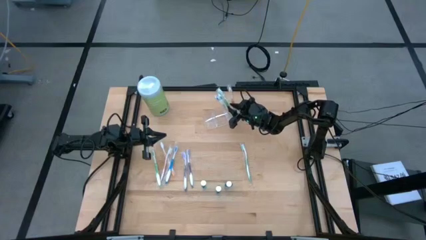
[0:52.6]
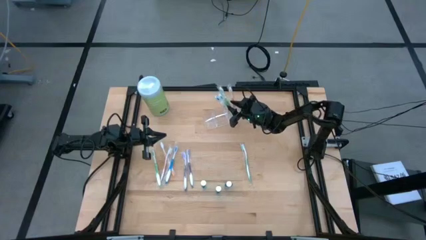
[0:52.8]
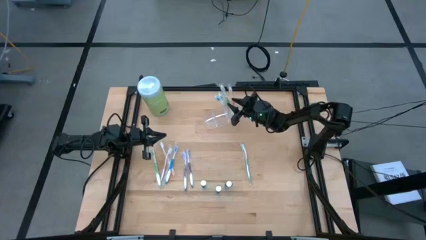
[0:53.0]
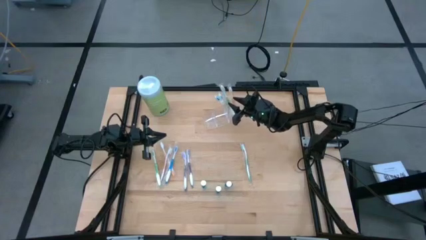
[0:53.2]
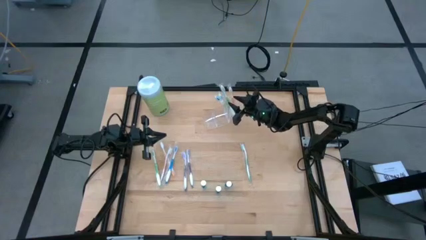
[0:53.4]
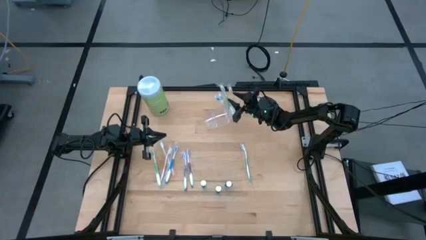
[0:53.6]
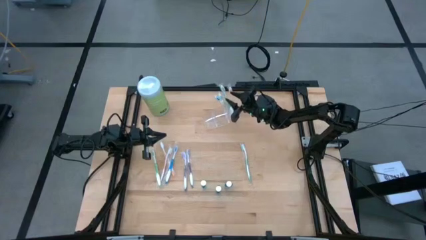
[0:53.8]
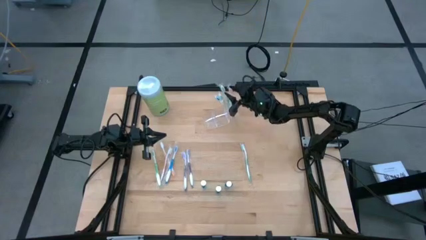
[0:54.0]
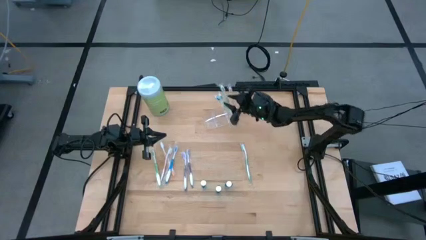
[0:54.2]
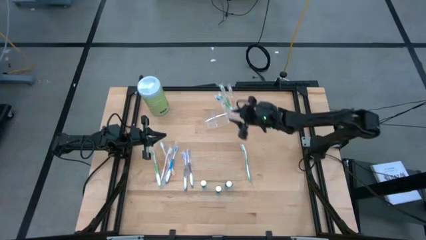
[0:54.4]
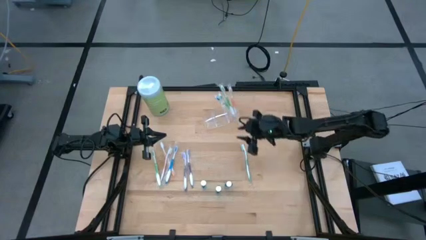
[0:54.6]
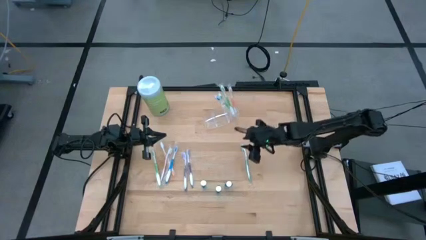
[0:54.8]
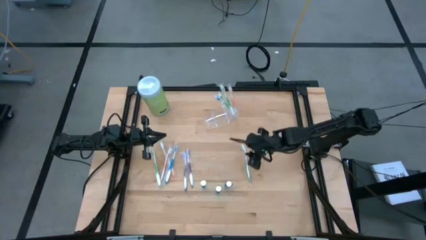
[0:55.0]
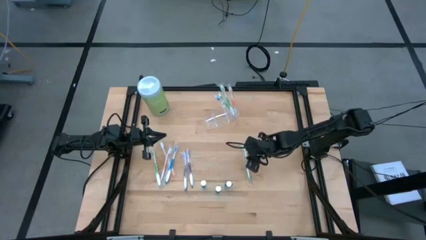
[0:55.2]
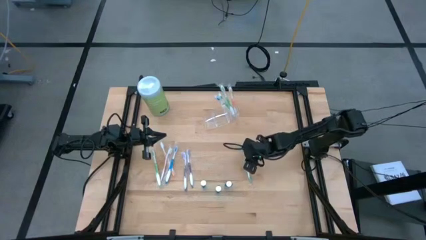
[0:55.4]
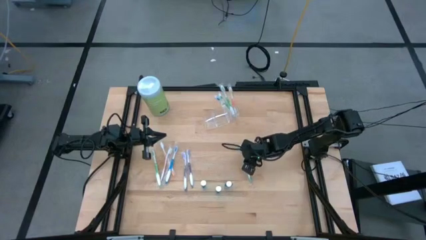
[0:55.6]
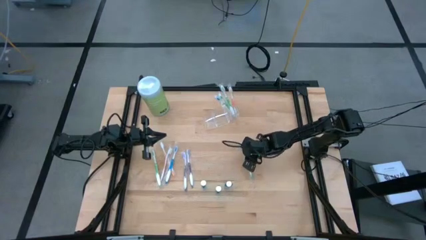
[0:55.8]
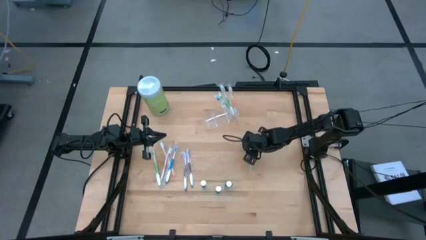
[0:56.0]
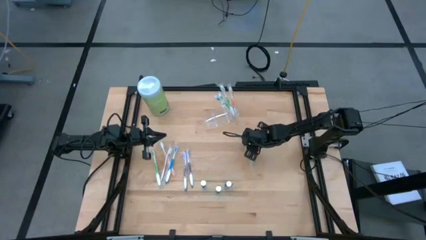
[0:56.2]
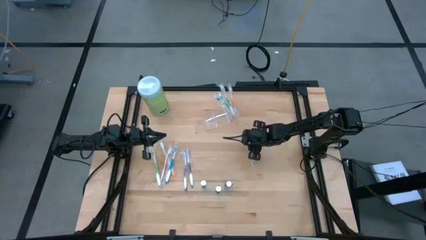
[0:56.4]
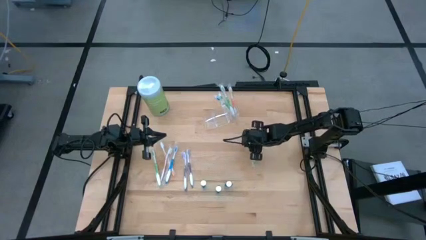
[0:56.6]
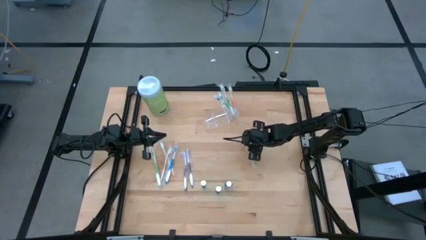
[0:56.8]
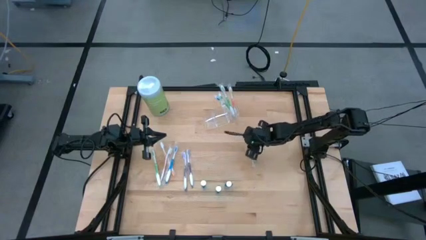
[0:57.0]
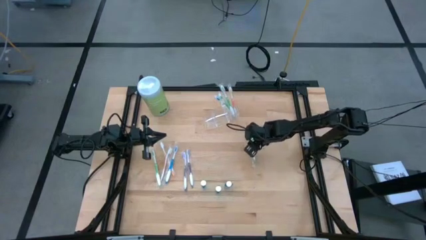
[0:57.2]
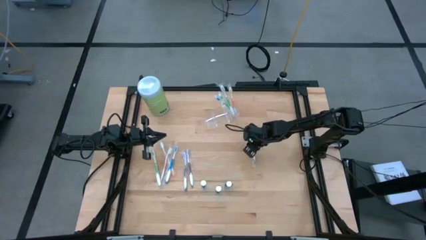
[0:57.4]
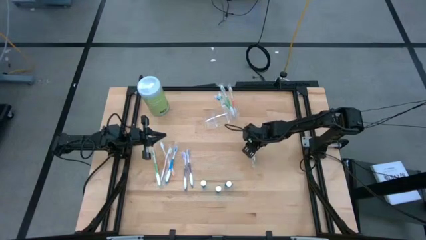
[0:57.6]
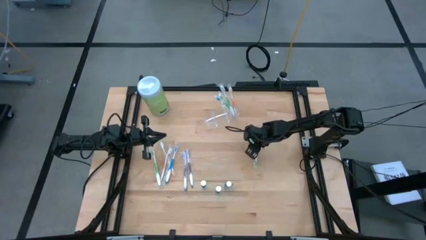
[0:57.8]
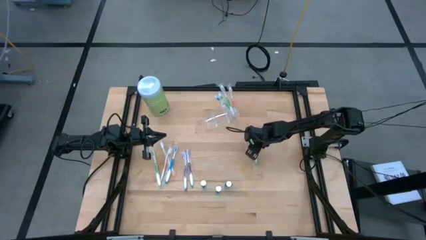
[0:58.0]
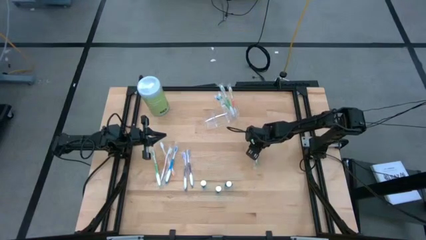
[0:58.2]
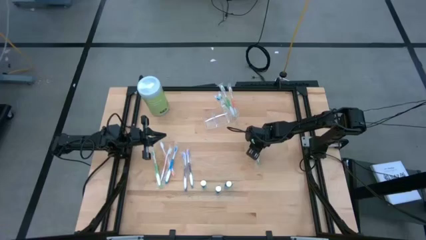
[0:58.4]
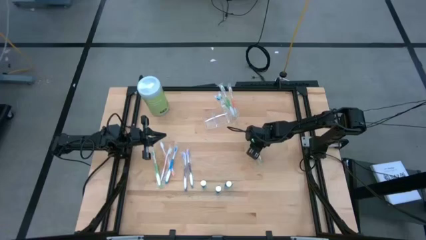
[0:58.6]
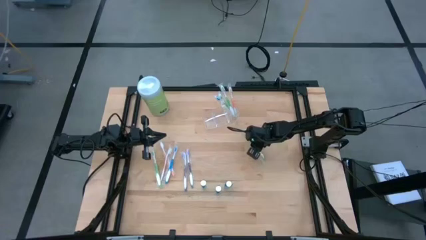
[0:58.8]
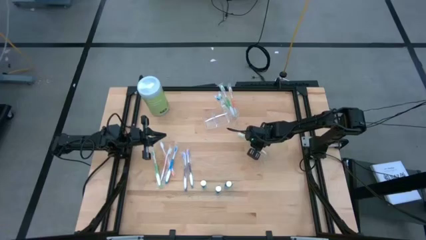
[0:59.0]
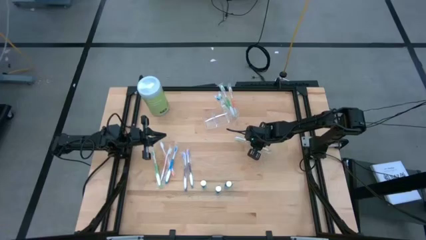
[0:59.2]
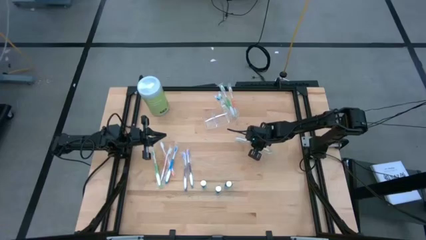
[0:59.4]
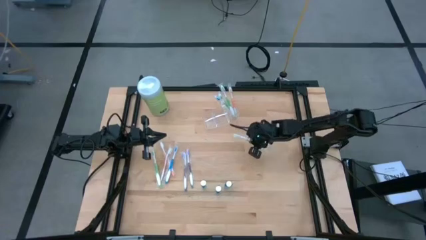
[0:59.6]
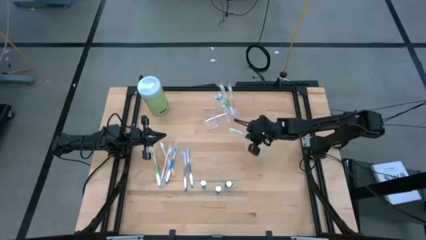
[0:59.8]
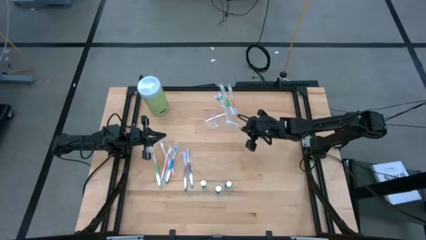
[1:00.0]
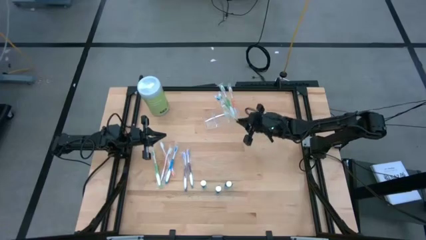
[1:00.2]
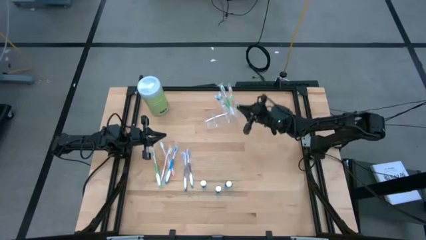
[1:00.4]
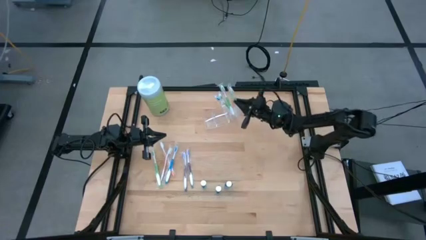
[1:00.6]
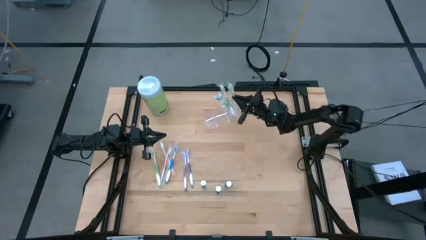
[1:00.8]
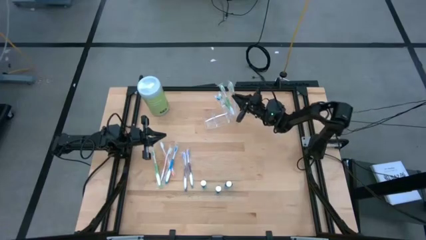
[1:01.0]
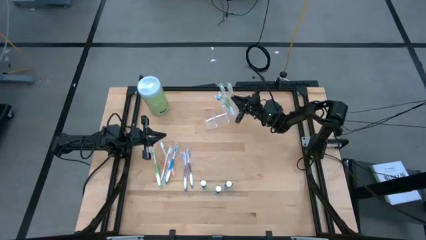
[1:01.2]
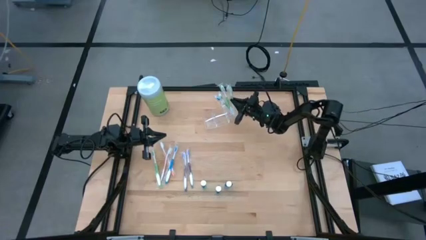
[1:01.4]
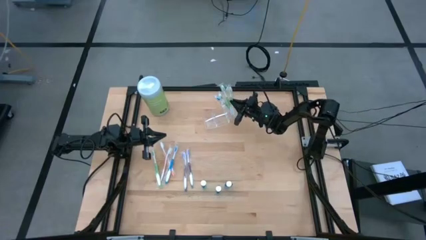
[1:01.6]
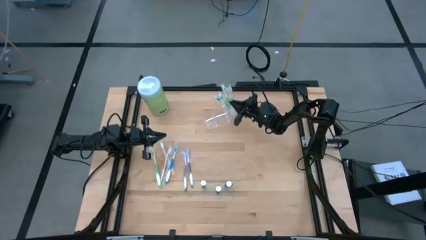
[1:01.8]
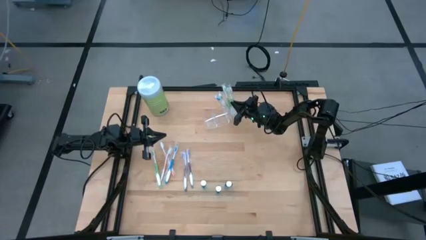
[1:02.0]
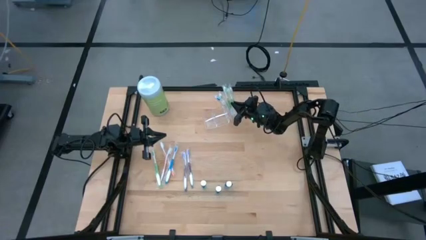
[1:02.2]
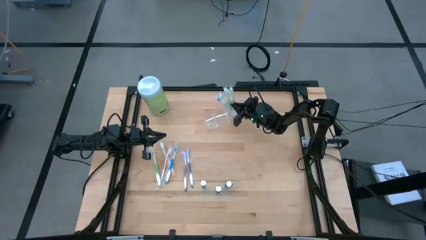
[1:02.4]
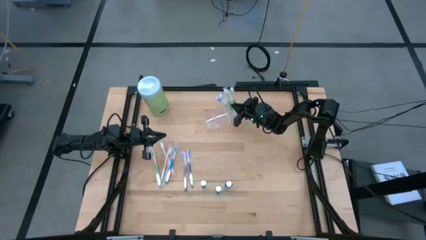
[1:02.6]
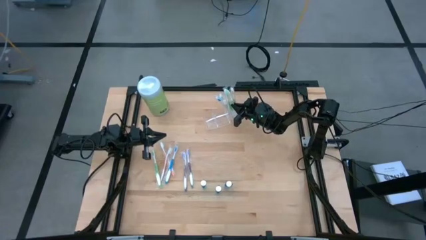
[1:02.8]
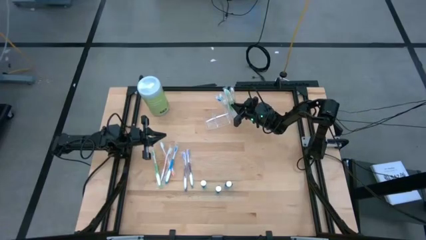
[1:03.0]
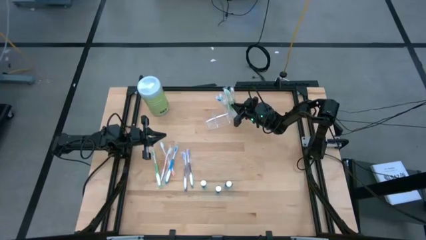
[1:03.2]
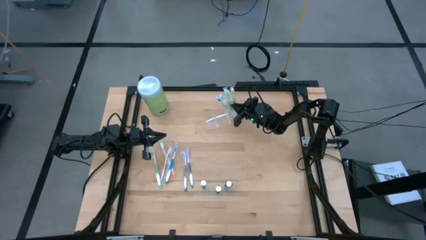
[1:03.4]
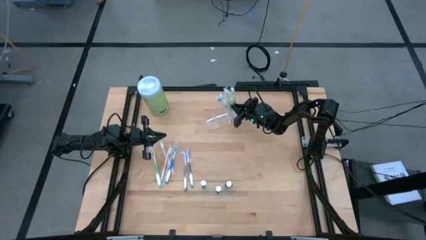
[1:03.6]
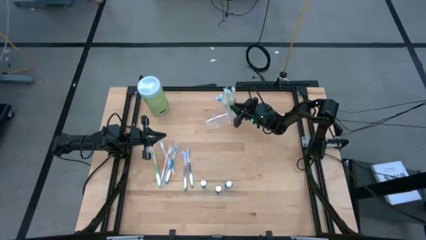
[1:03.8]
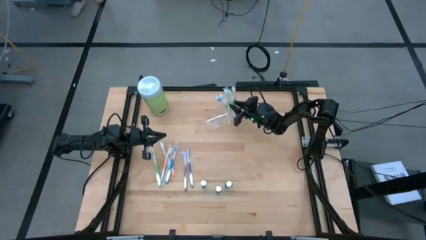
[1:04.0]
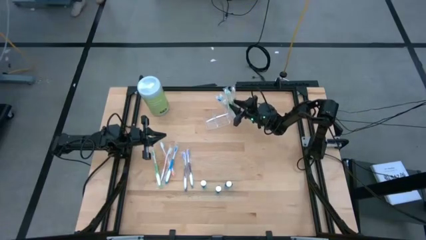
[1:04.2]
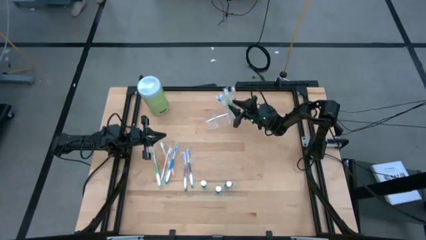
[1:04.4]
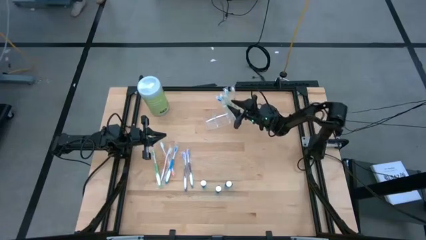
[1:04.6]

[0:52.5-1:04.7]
Task: Pick & Place toothbrushing station
Put the green toothbrush into the transparent organizer

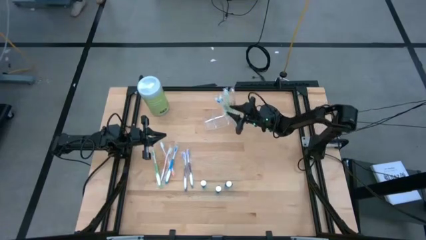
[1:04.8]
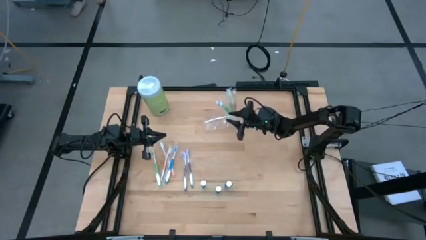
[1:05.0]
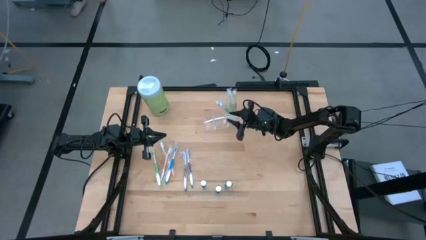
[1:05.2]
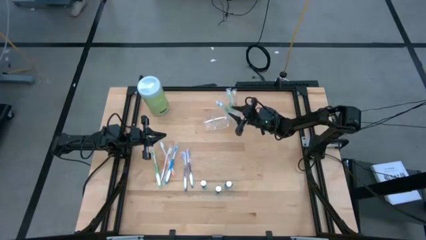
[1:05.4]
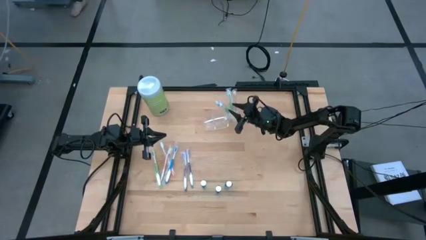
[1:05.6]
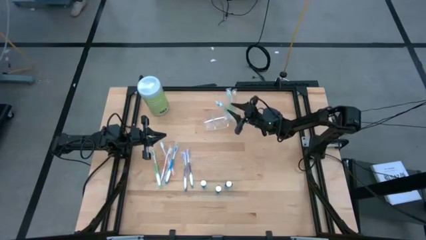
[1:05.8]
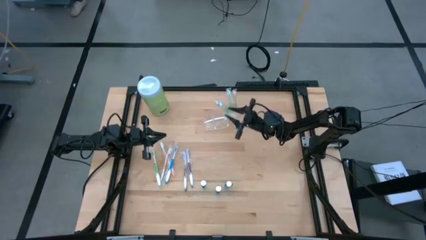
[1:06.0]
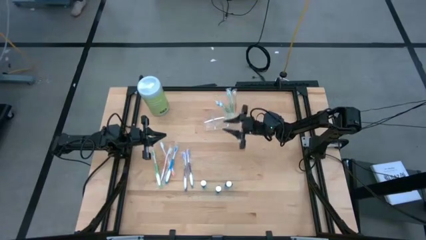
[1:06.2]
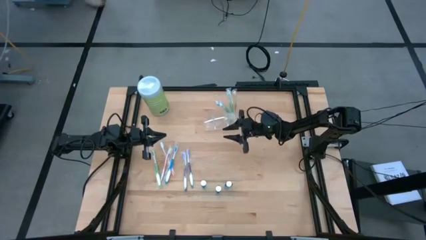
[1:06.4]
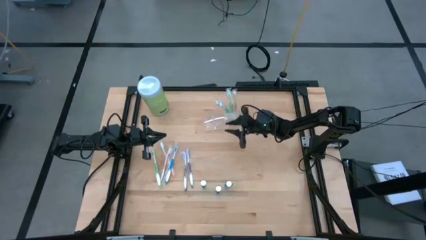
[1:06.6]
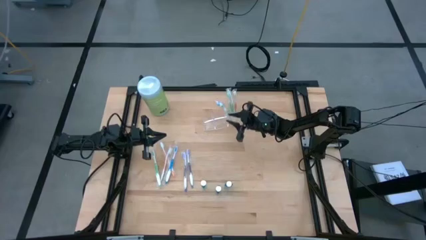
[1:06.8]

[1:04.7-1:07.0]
Adjust the orange toothbrush

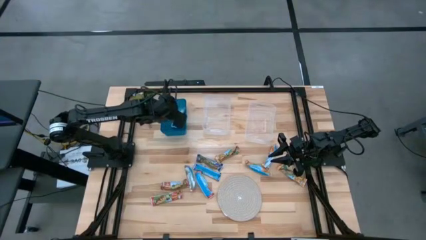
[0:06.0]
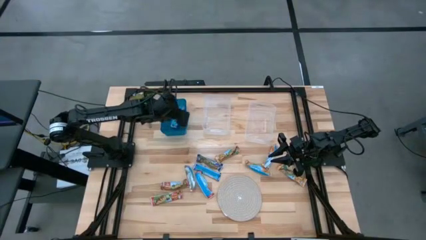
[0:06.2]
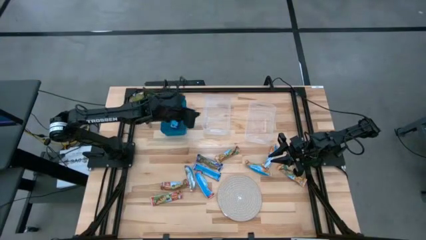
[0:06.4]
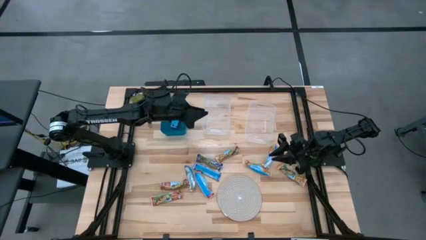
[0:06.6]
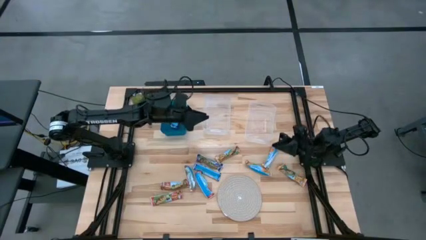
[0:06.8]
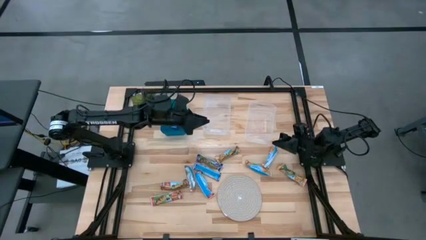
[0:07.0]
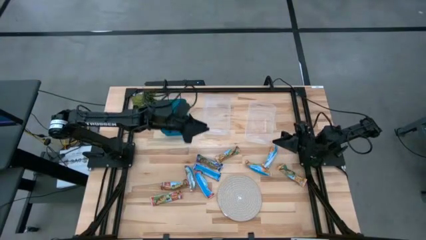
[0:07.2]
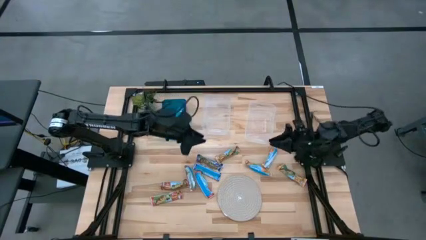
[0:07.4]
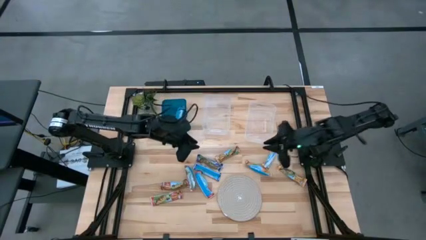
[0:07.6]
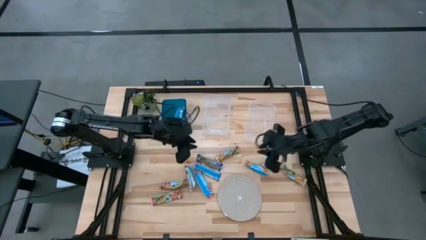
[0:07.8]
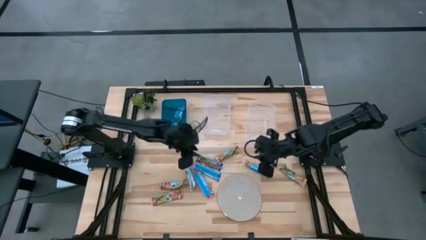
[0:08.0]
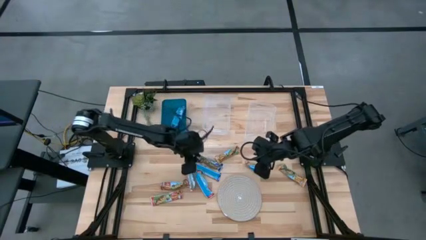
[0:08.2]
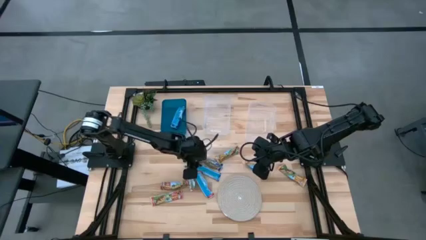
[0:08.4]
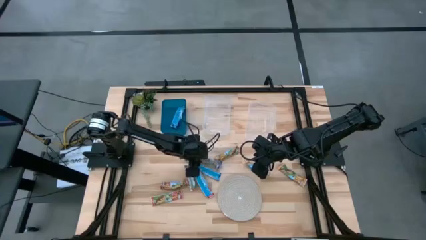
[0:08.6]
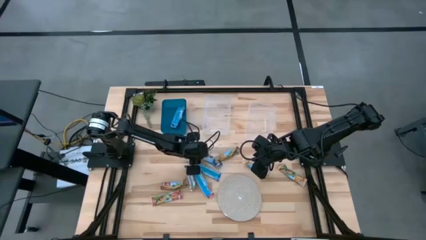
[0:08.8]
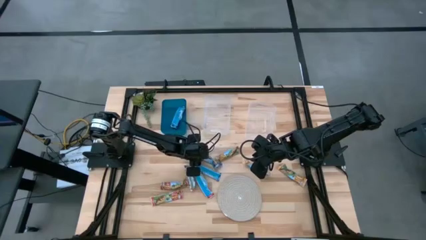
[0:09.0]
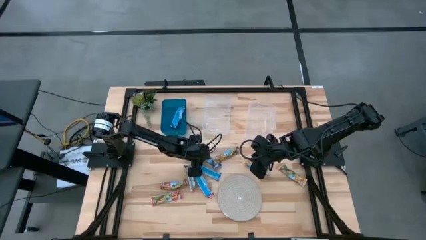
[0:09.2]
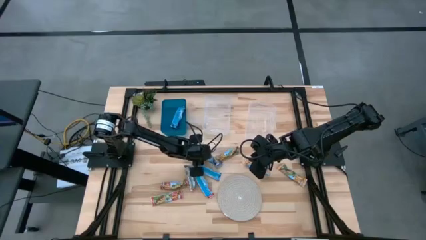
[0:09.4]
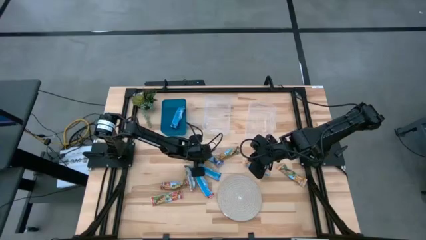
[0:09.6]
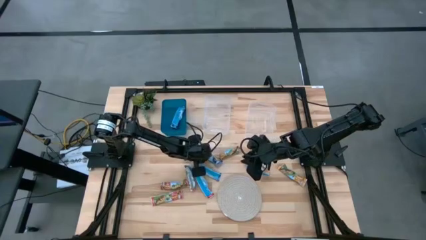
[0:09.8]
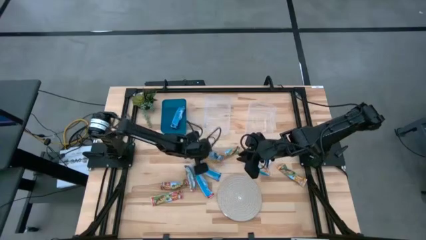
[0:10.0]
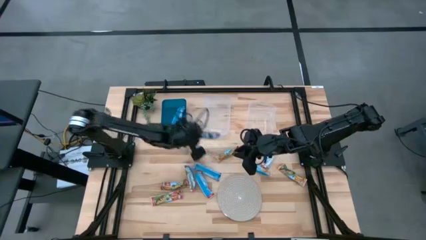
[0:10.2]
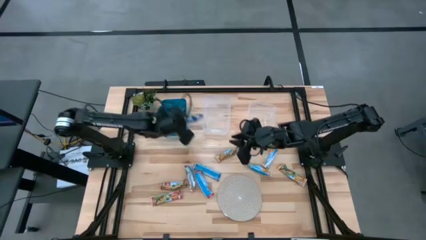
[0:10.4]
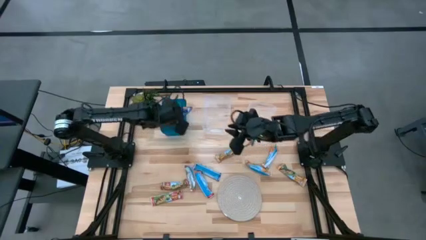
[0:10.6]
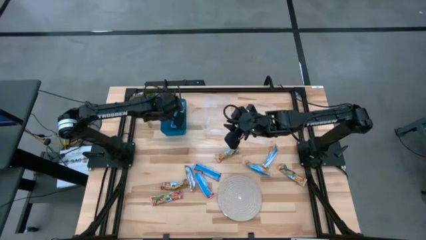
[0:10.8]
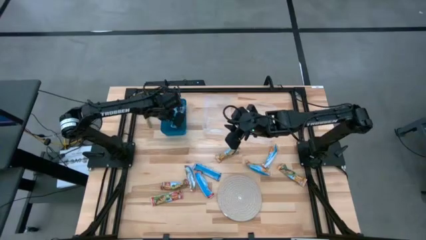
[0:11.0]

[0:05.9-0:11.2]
Task: Pick and place Granola Bars by type
Put the blue granola bar into the blue bin
